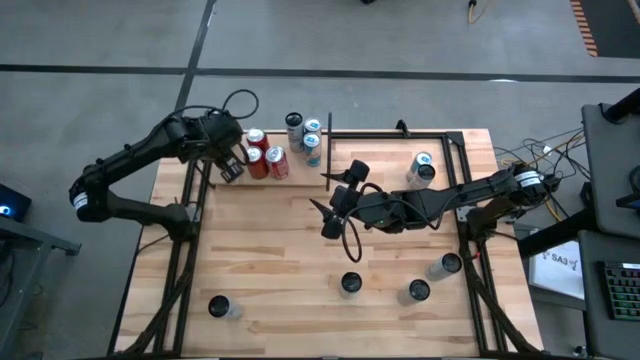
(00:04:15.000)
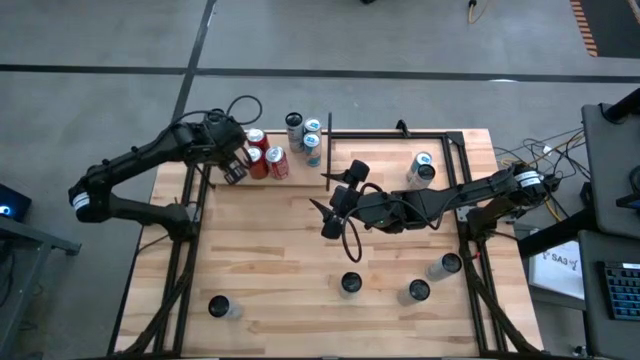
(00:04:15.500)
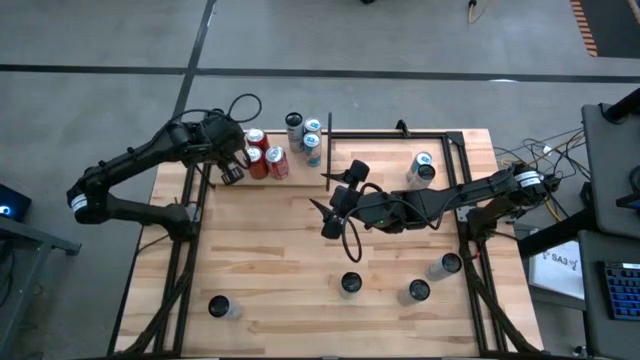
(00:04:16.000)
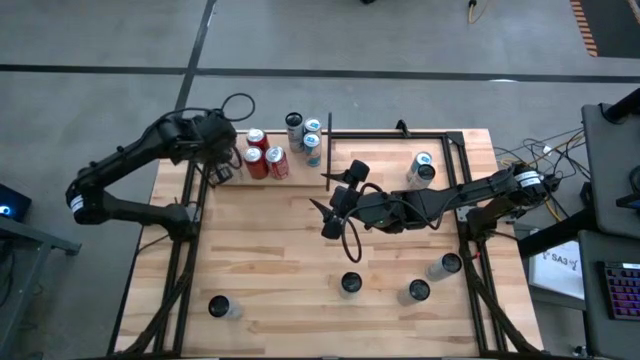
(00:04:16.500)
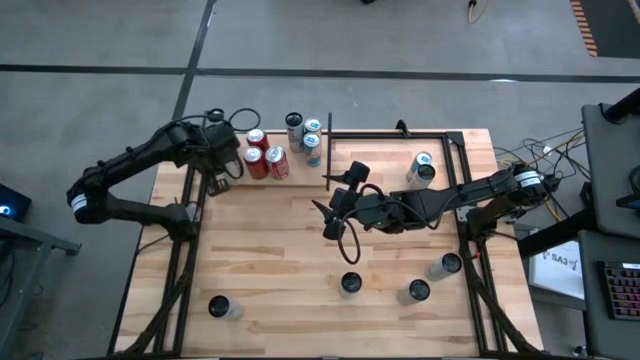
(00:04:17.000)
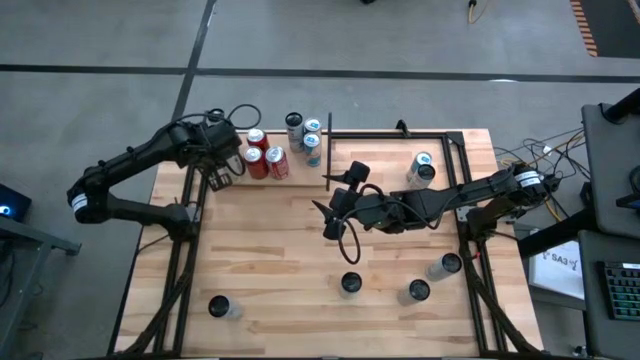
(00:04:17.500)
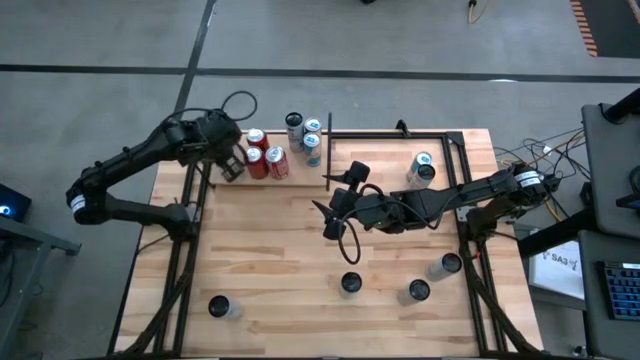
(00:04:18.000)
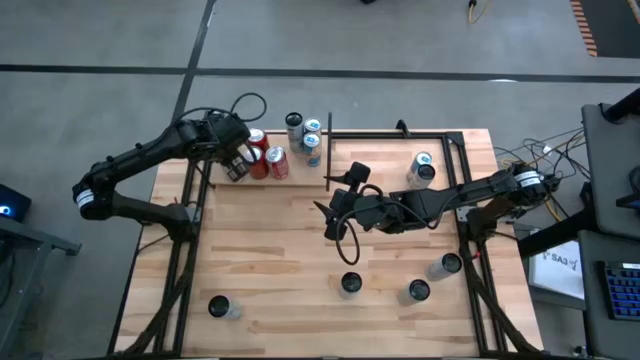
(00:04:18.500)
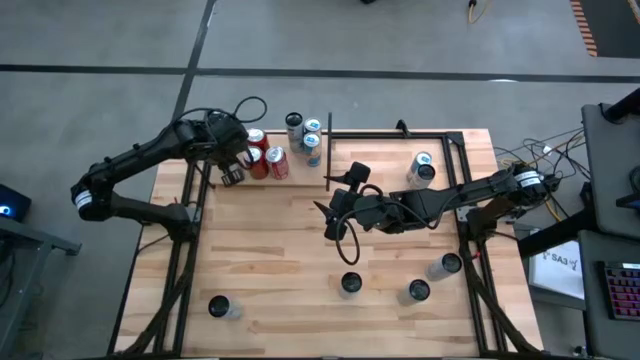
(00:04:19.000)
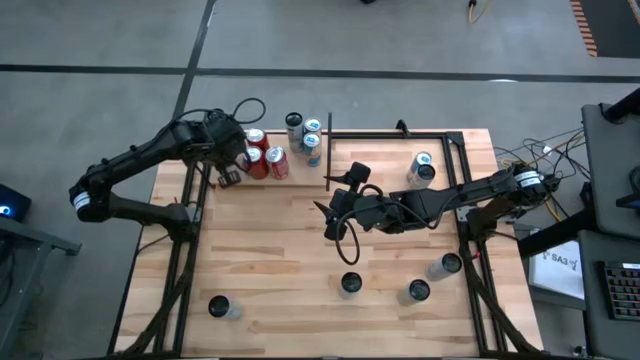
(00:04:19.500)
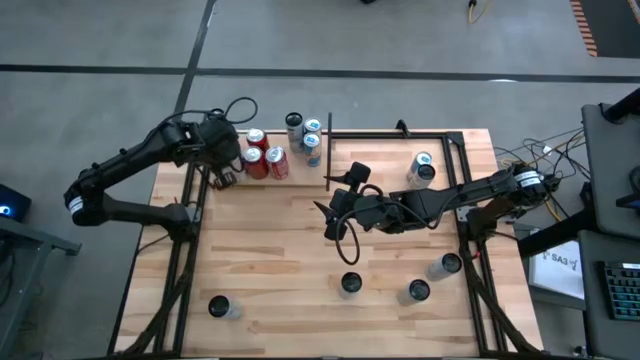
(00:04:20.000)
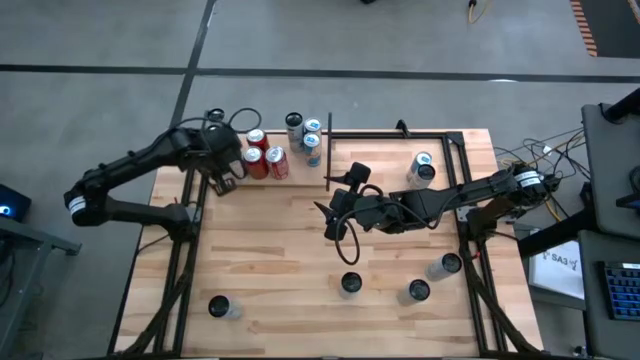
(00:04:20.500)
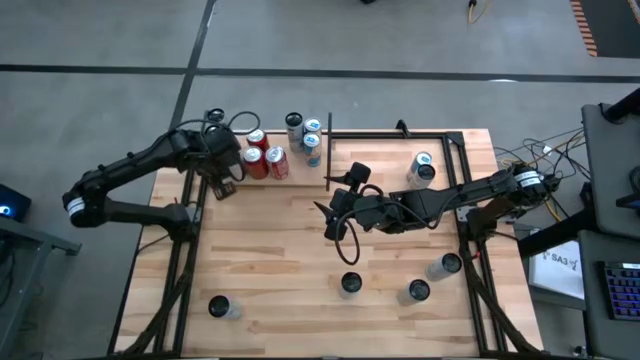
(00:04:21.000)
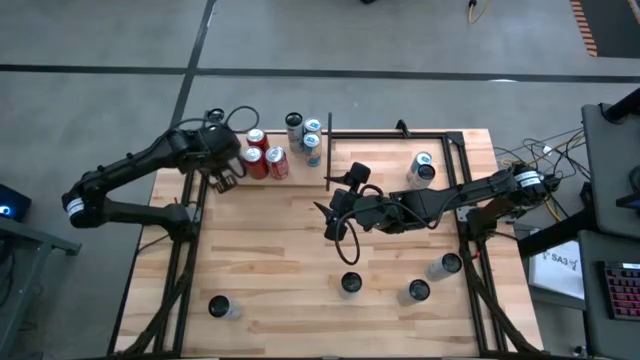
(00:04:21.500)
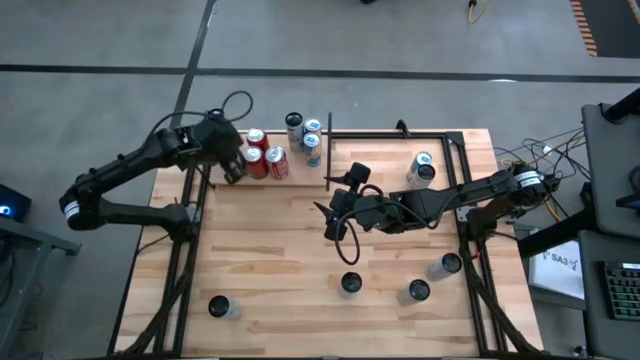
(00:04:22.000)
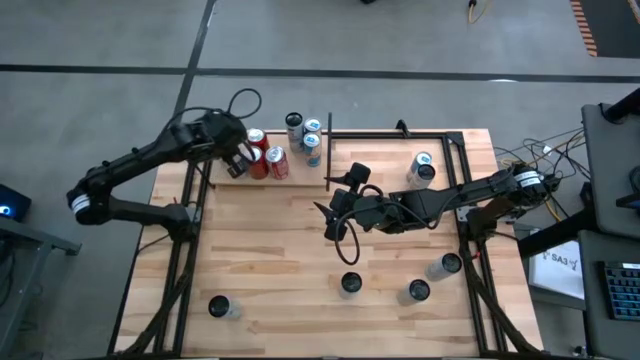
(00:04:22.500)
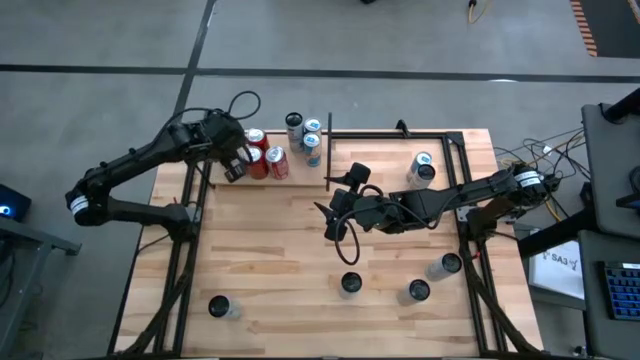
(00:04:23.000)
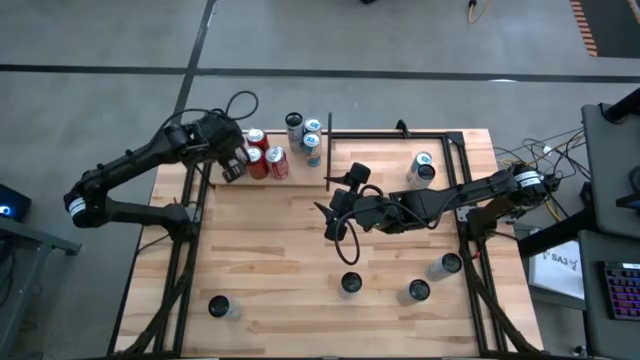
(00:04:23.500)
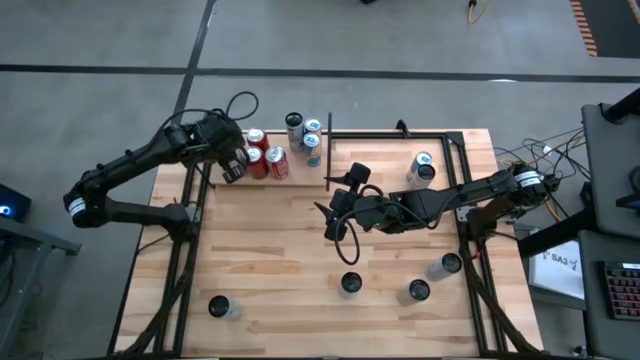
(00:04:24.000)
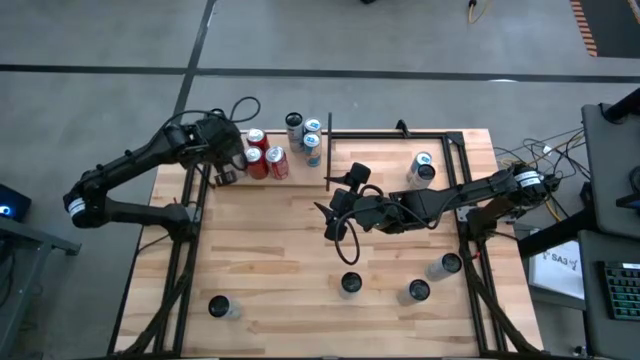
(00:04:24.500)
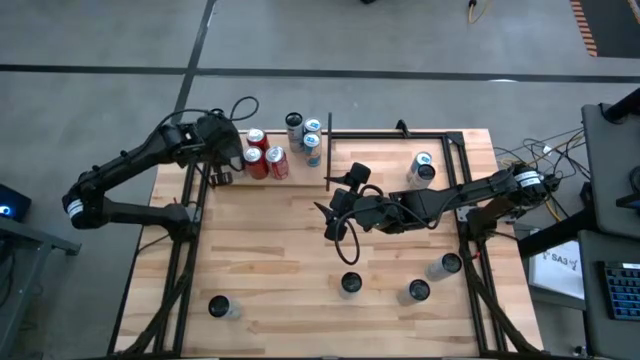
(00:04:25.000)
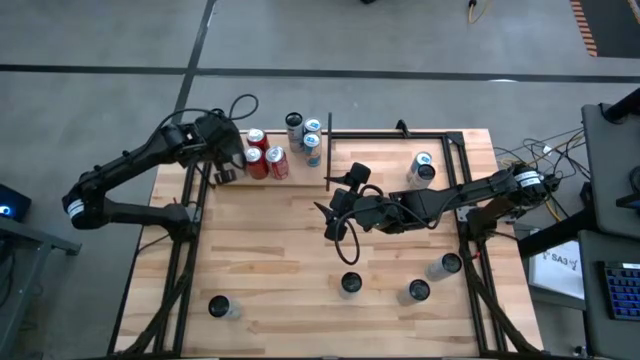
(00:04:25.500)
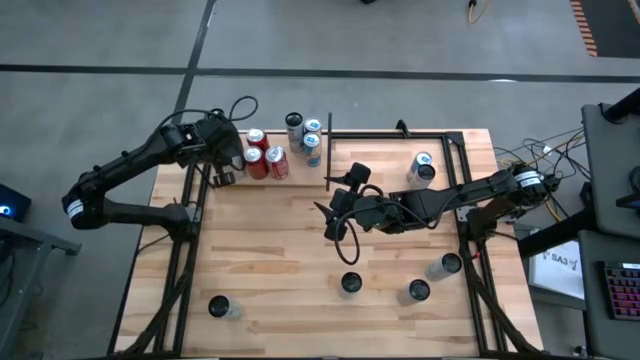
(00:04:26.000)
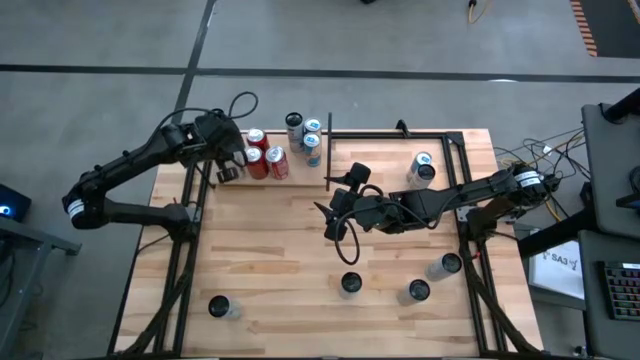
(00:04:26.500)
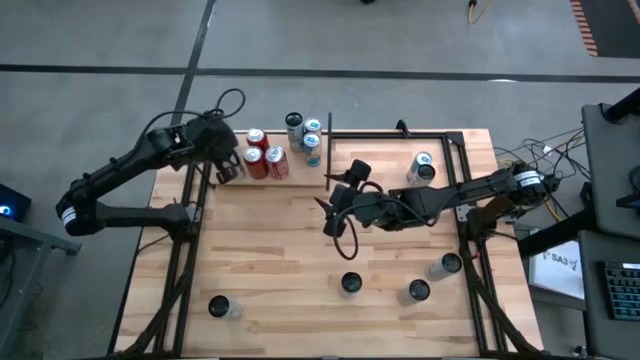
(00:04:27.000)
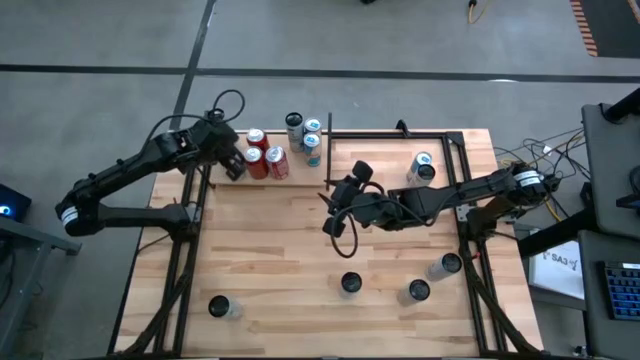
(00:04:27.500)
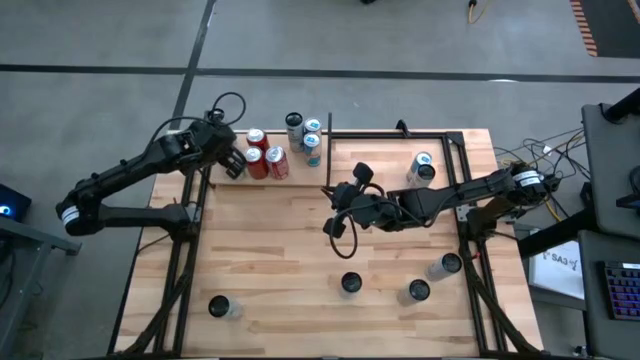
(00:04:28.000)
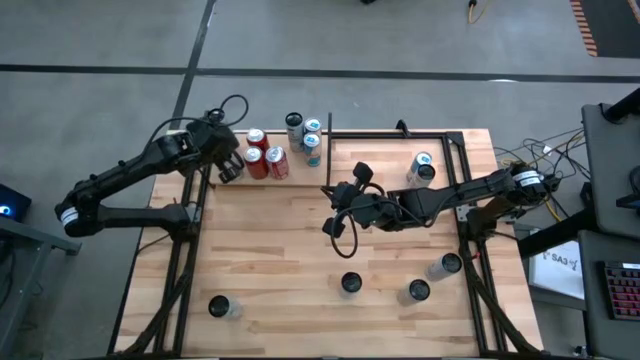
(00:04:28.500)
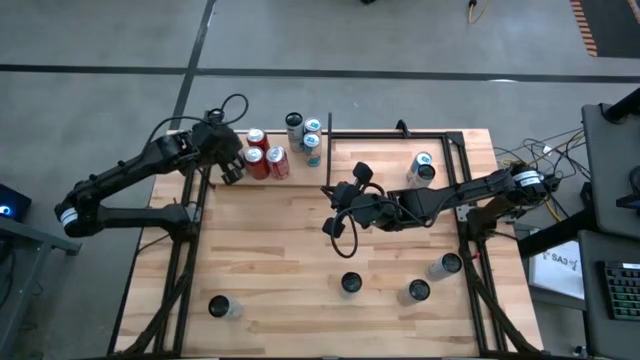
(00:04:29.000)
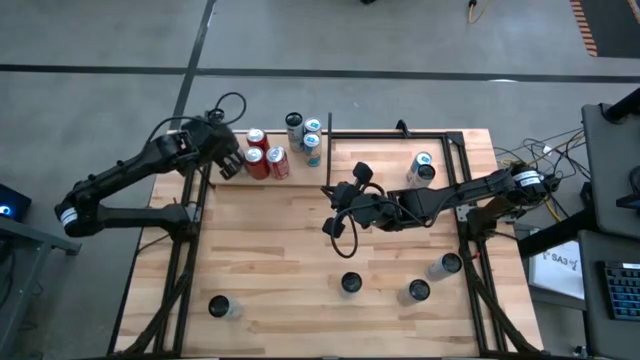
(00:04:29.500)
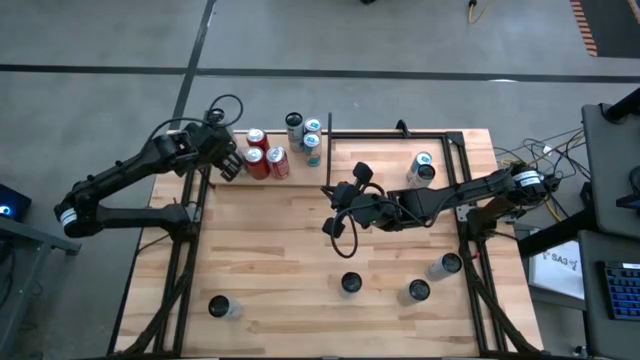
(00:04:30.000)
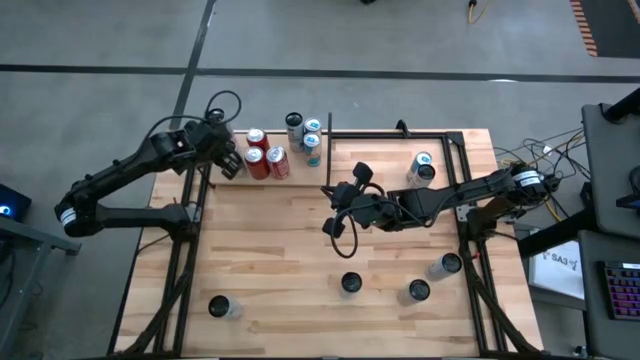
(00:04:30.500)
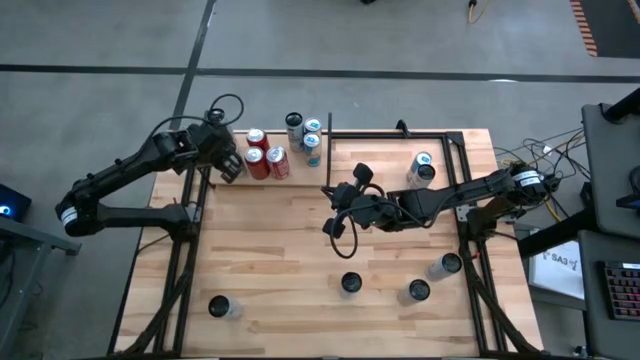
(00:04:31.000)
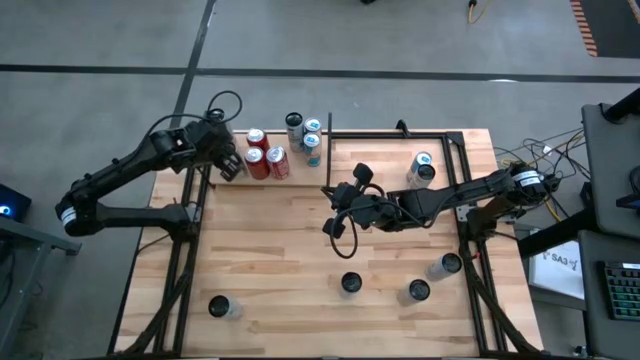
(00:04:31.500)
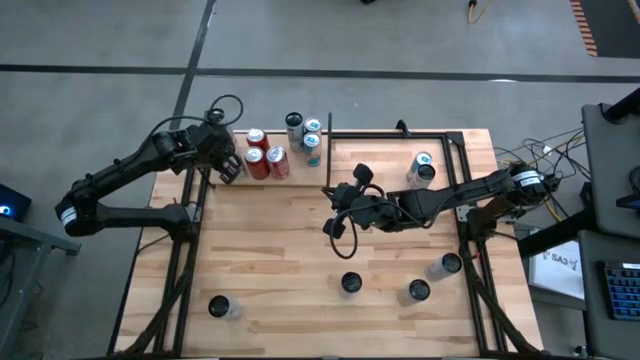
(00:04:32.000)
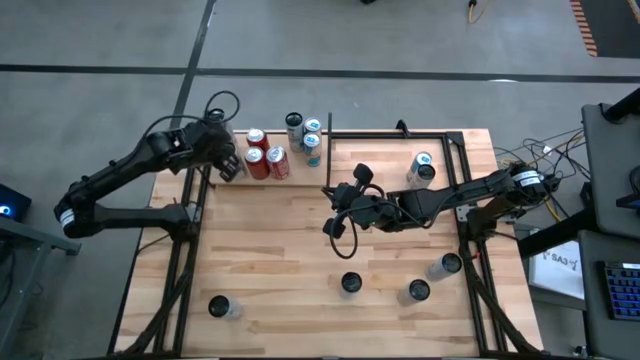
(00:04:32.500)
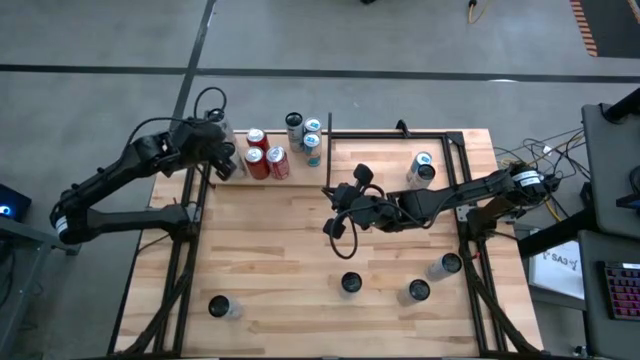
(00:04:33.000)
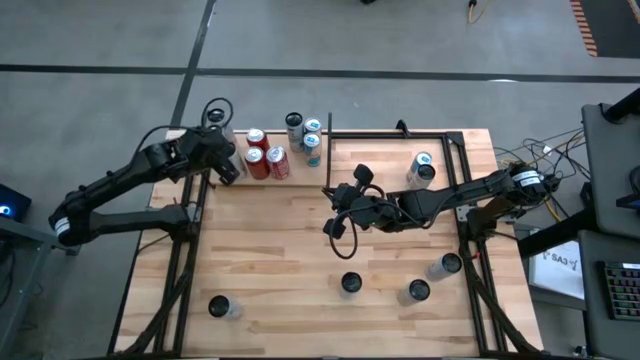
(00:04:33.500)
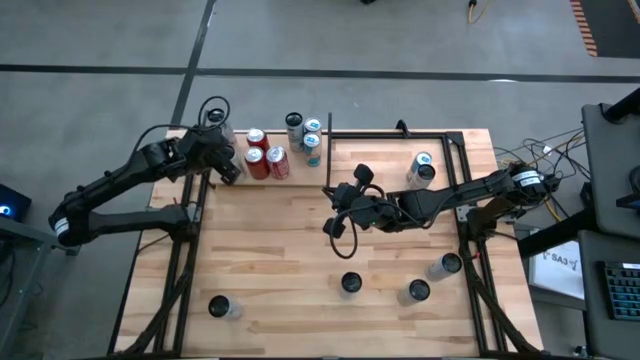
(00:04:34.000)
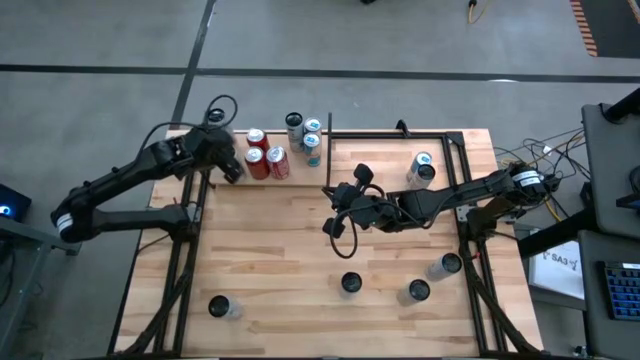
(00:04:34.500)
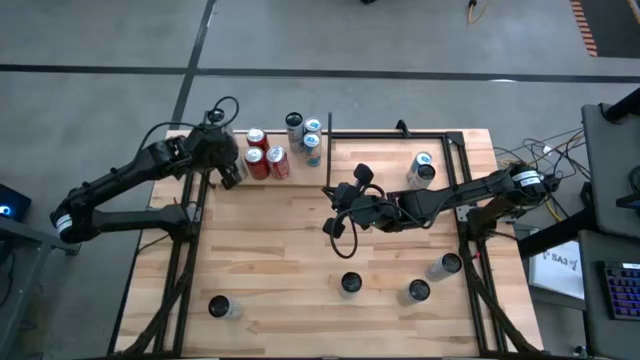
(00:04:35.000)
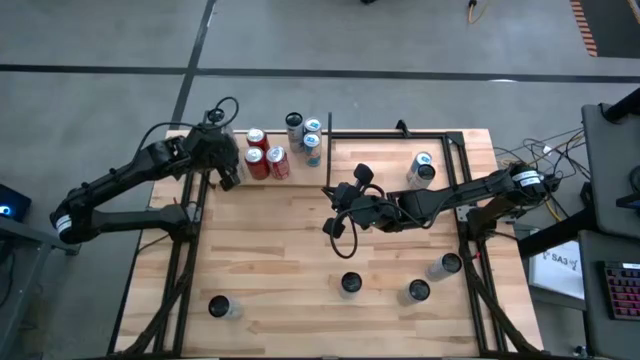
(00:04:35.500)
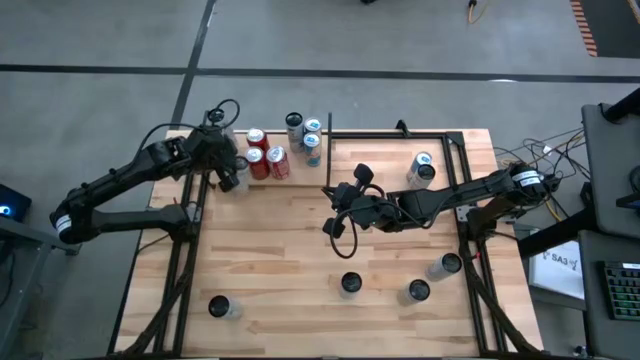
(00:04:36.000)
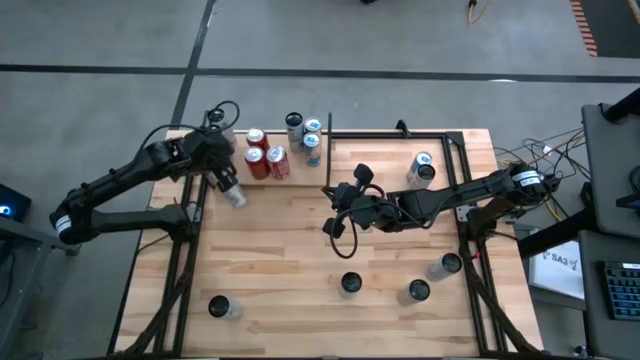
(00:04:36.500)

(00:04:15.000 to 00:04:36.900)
Task: Place canned beverage on shelf
Put the middle left white and yellow soda can on the shelf
